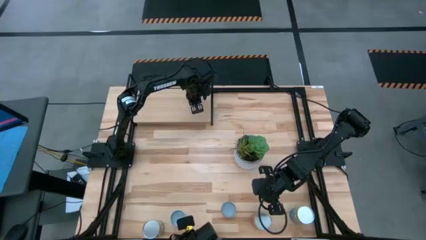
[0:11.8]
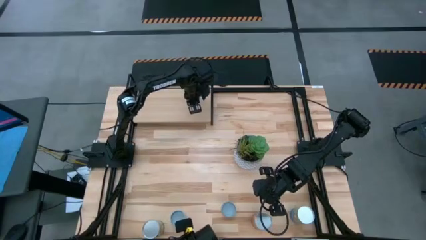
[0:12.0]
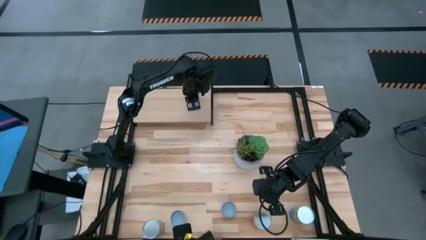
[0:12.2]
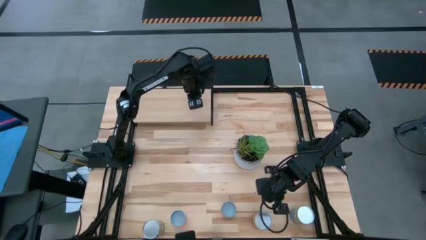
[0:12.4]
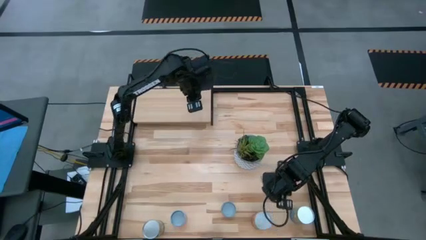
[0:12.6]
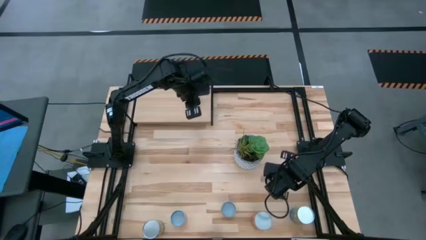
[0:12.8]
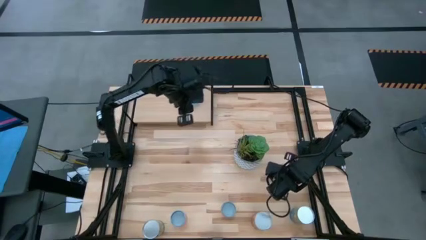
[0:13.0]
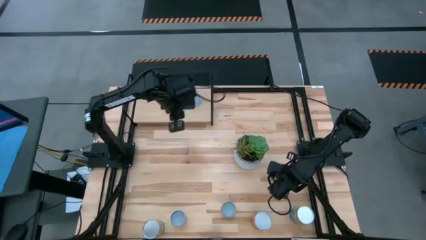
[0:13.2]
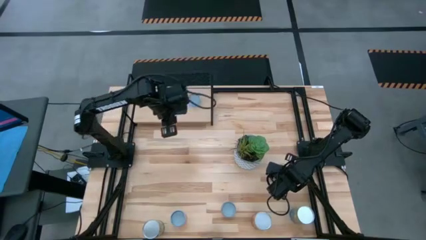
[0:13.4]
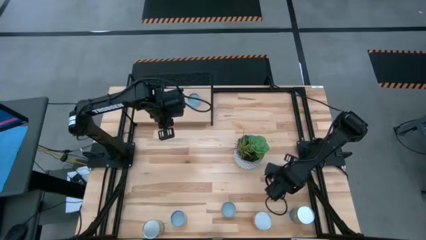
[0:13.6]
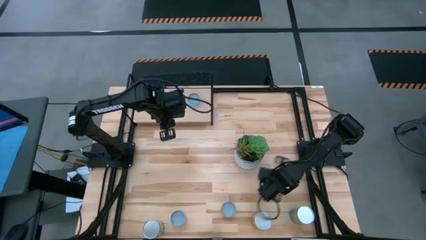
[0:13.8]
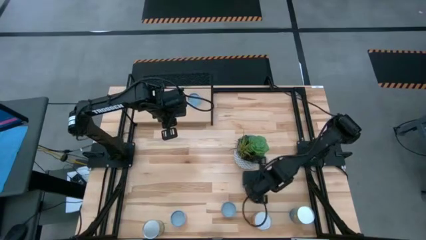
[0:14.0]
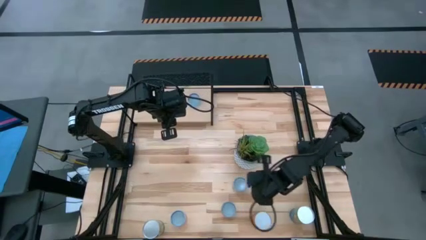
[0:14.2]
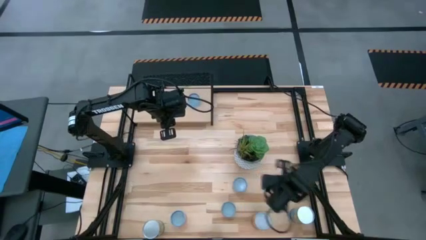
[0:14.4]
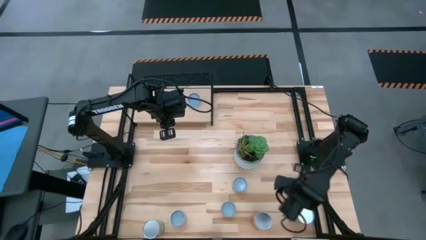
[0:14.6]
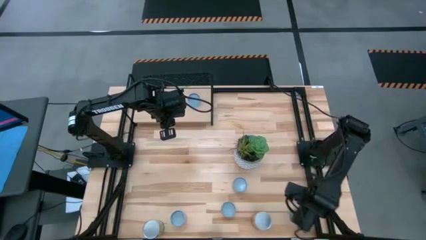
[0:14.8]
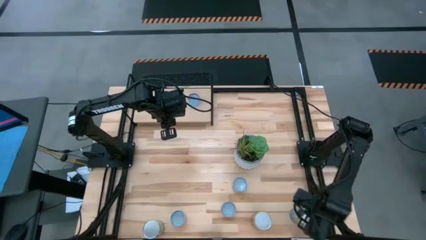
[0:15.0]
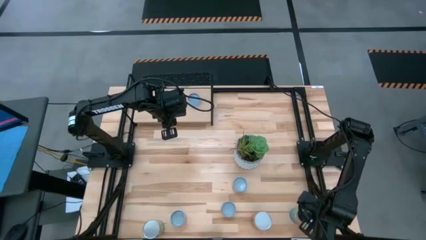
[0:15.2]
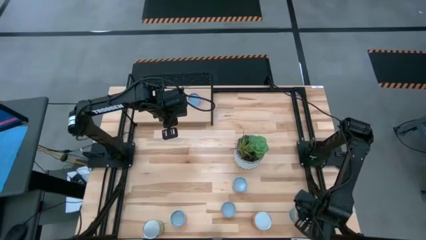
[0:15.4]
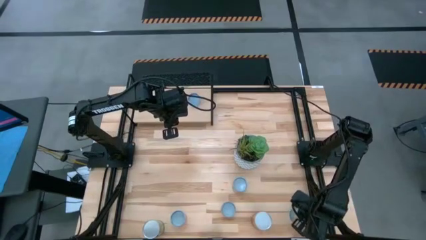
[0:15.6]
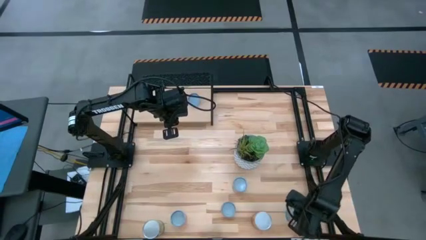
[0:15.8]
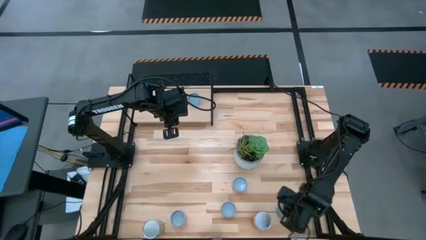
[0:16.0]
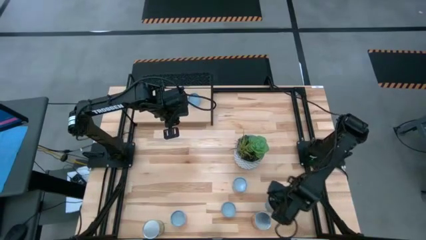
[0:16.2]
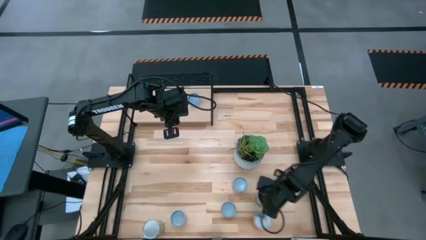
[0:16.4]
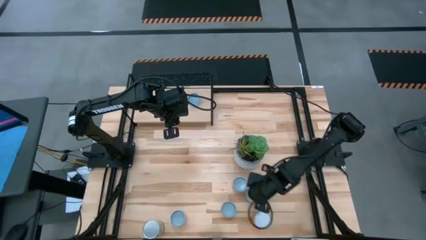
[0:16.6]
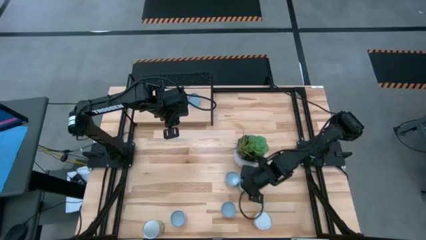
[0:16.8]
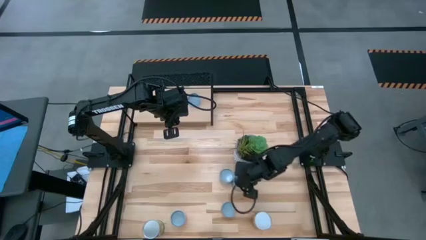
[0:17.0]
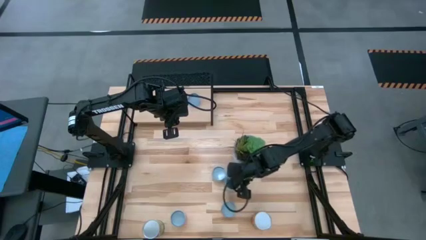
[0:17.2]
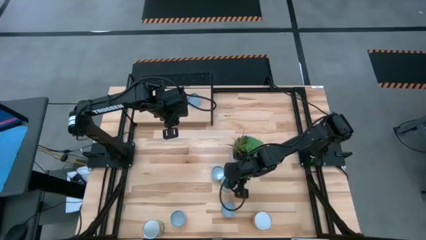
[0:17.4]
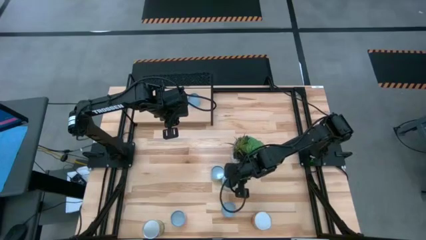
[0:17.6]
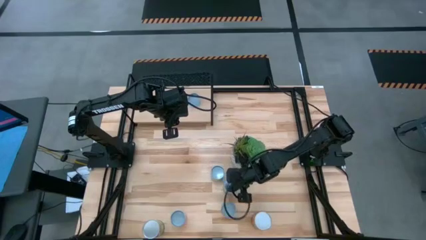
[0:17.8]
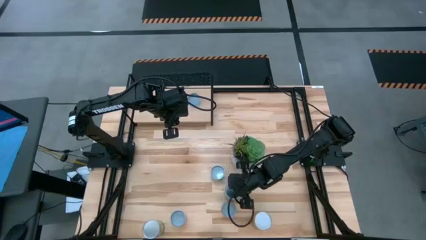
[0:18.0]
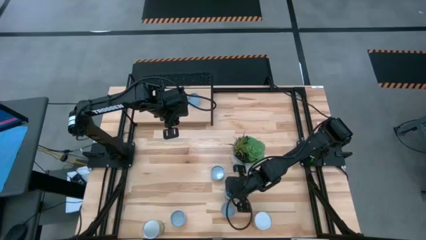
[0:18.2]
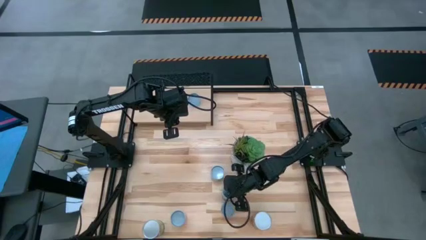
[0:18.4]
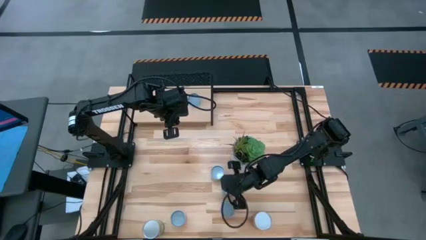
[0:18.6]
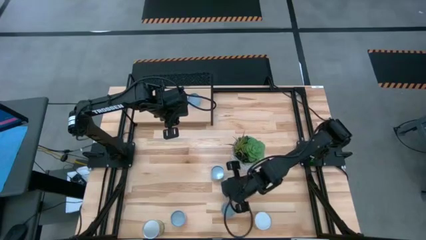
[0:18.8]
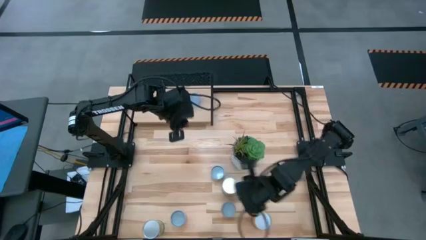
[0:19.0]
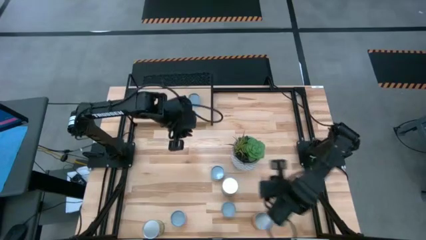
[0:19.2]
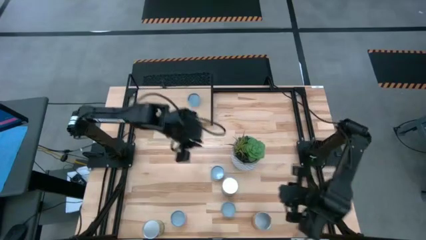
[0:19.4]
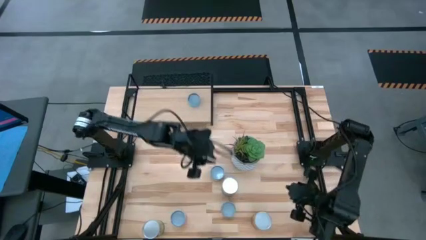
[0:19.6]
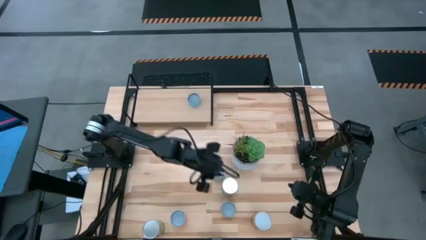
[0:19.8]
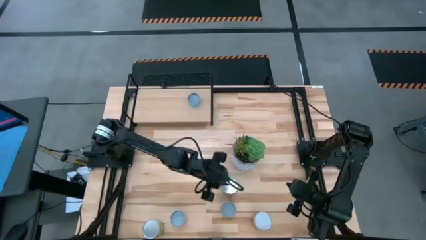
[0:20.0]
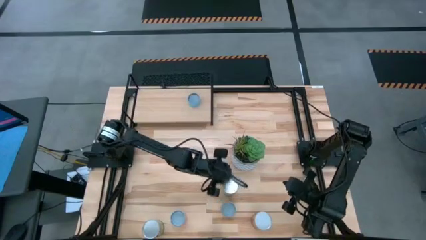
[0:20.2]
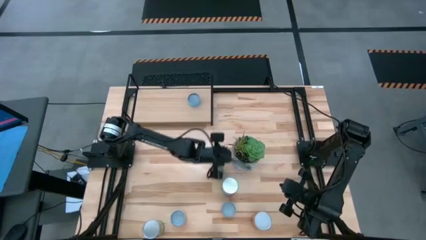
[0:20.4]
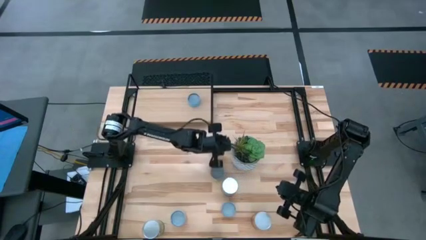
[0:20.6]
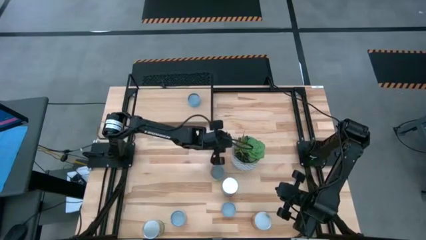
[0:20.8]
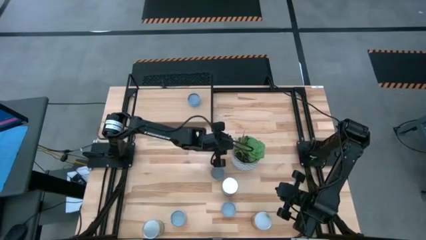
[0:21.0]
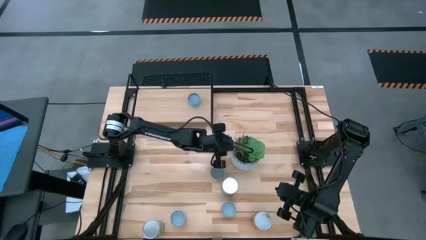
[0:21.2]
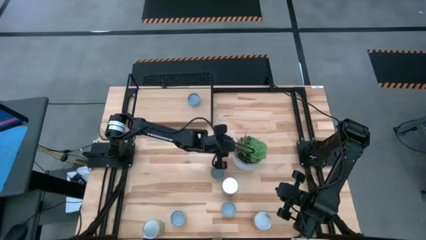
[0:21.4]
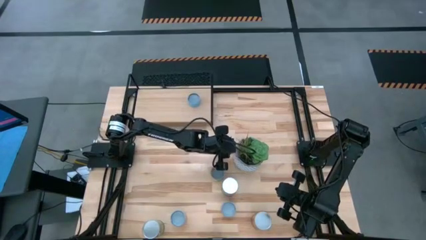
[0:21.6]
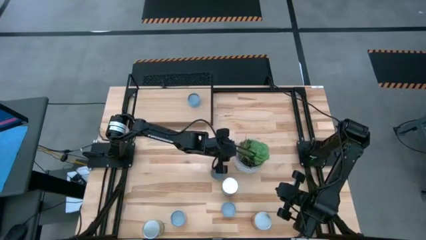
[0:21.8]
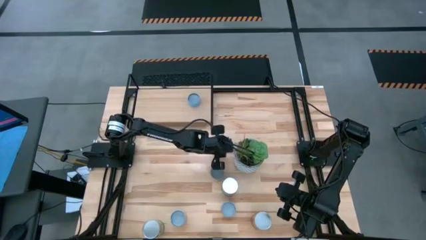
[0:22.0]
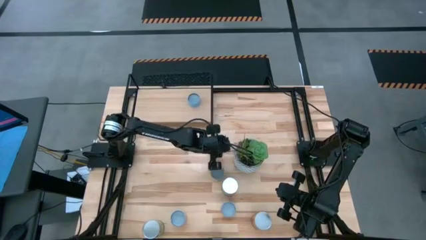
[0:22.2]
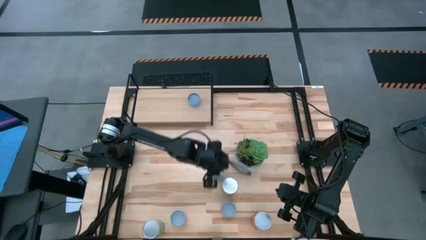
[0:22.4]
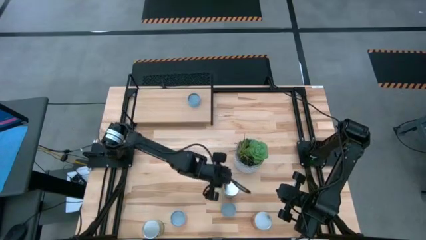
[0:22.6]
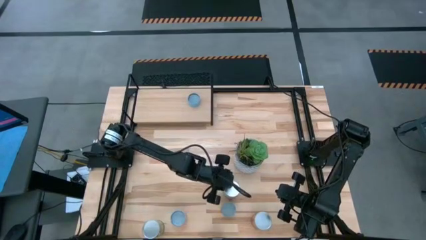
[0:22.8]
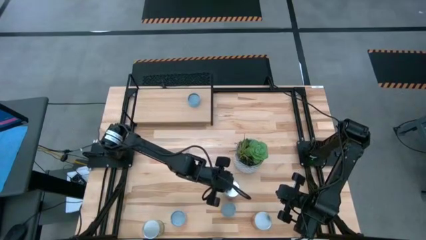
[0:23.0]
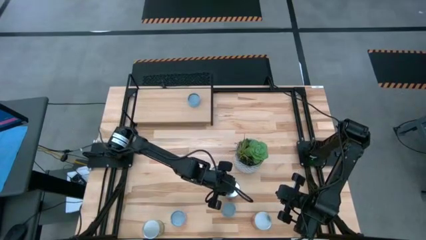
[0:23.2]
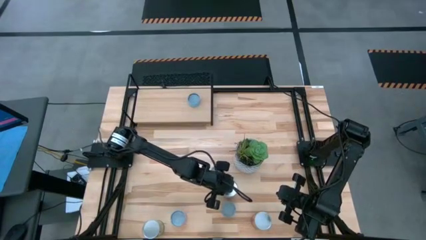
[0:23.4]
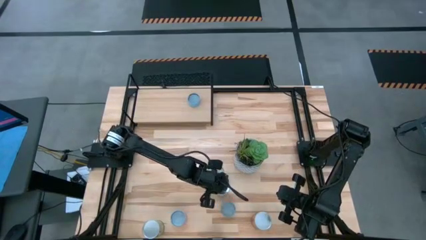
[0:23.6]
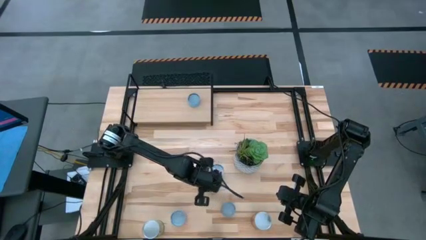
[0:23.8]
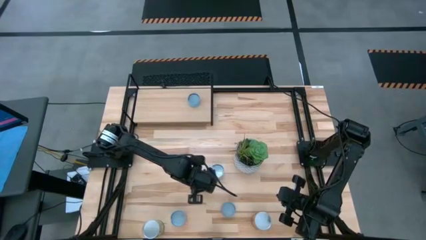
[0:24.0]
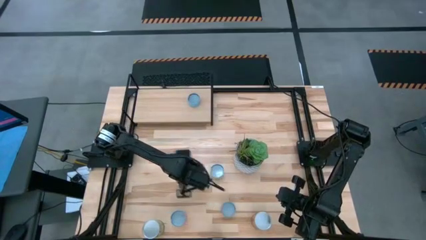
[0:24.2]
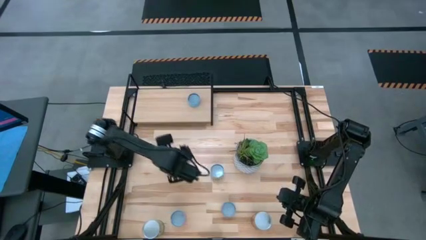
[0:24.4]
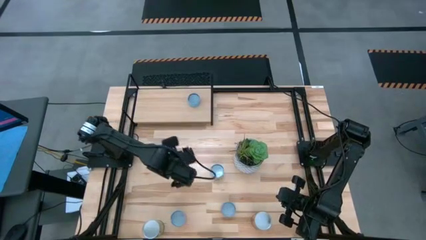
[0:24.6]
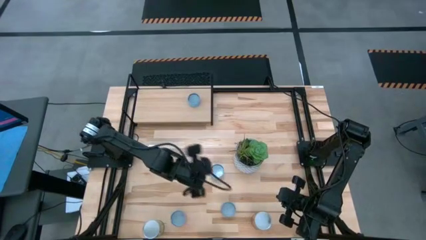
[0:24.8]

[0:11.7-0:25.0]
Task: Pick and place cans onto a shelf
Adjust the canned goods

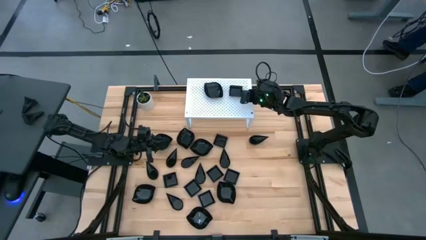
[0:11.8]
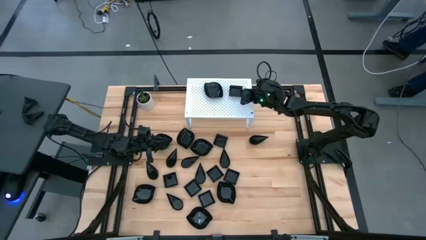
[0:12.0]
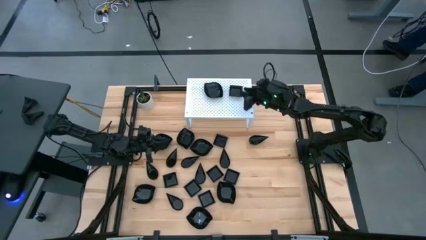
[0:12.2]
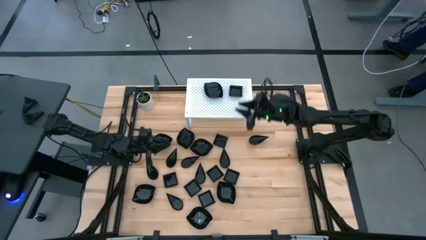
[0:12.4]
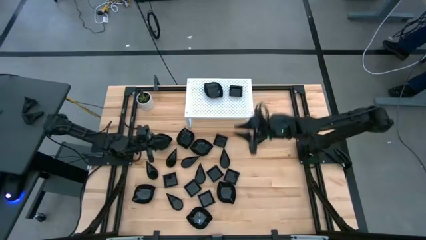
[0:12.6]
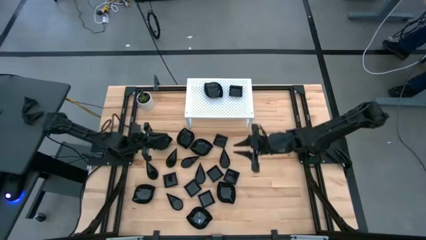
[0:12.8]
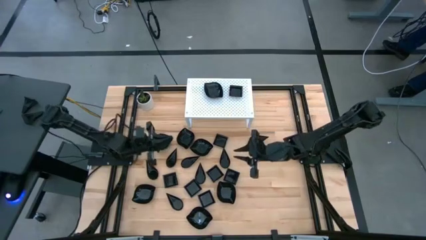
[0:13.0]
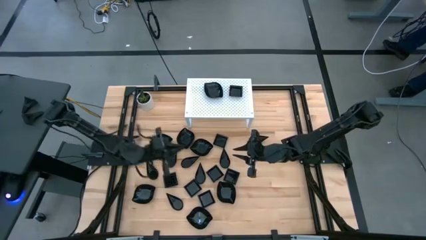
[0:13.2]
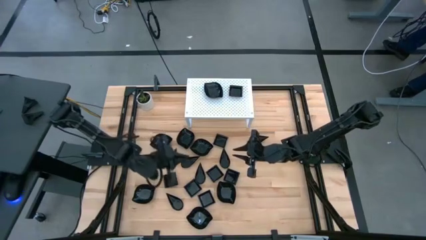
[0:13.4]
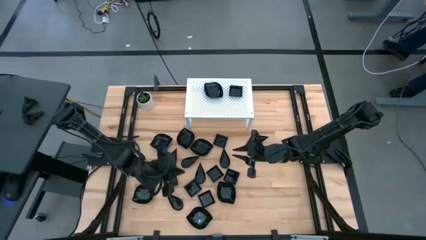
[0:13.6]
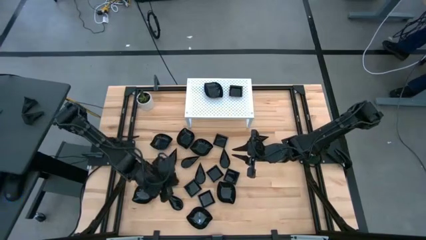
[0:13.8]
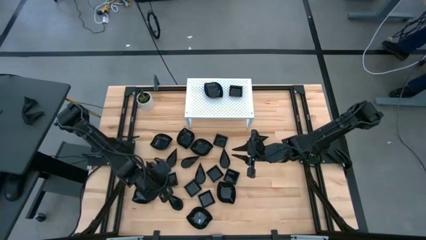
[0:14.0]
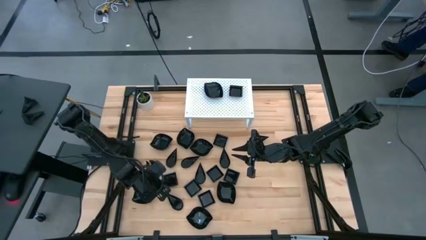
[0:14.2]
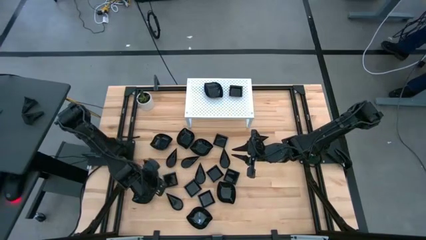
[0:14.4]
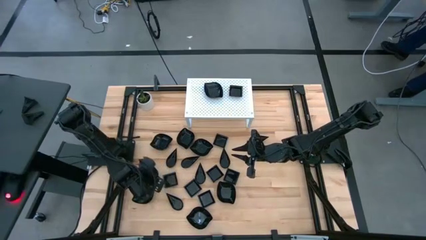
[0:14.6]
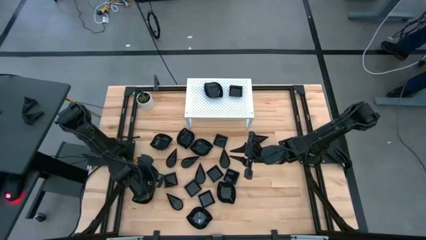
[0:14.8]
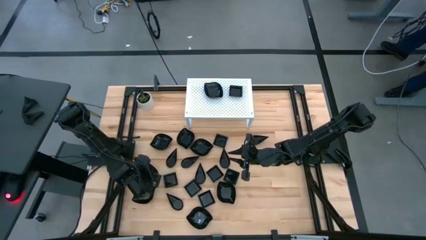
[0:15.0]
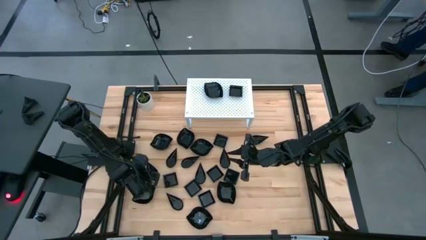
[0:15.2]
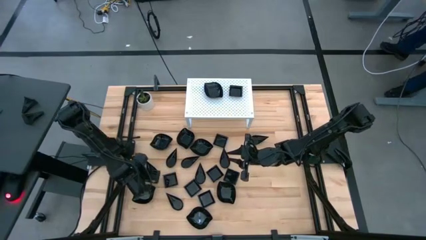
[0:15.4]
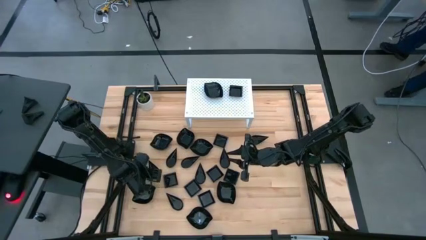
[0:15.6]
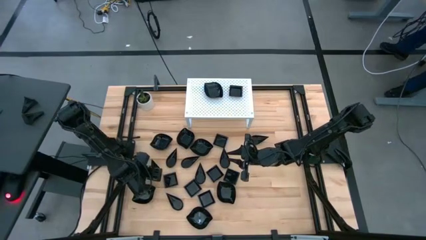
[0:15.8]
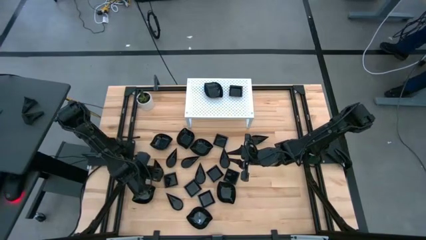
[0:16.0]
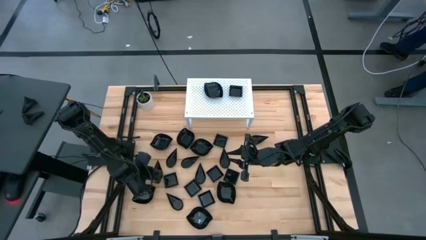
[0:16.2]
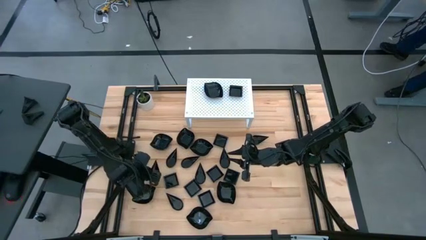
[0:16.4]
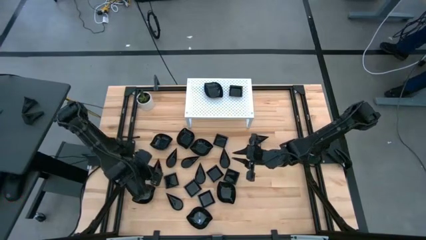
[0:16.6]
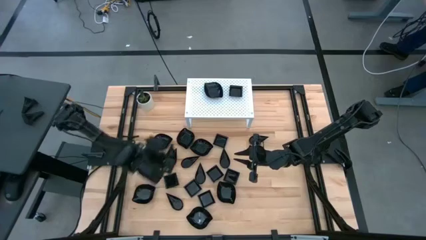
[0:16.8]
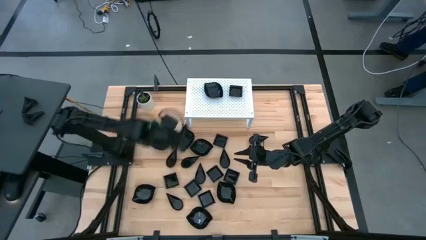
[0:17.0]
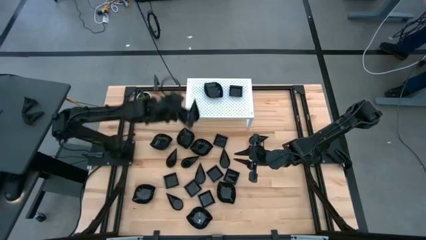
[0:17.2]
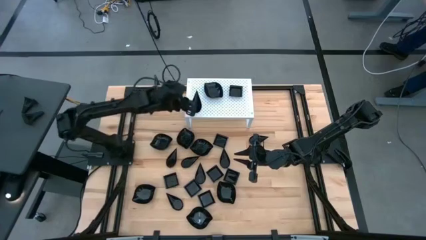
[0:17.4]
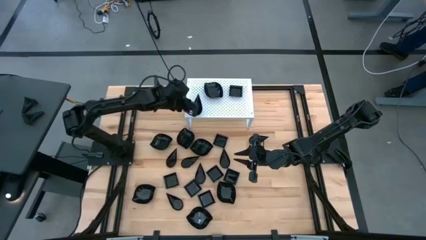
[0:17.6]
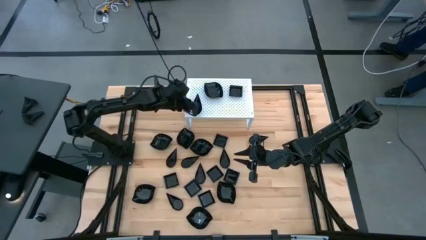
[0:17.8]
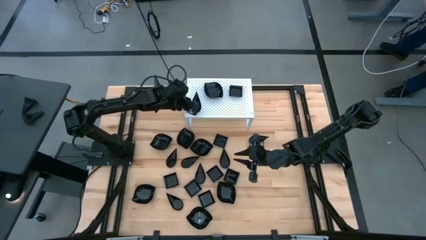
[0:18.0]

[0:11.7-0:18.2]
Task: Pick & Place Mini shaped plates
Put the black drop-shaped plate on the shelf
